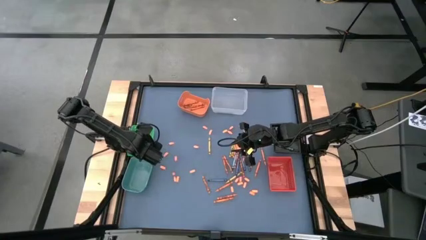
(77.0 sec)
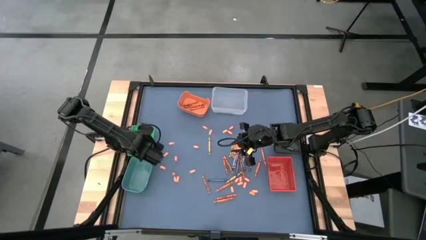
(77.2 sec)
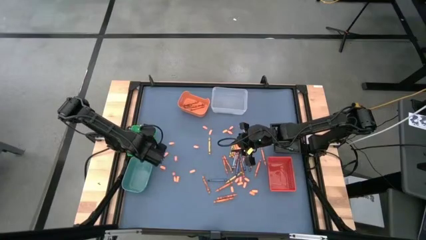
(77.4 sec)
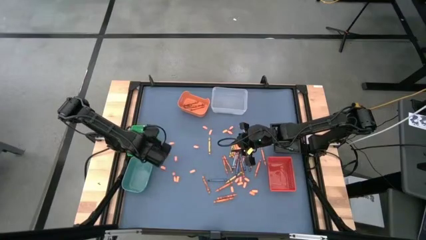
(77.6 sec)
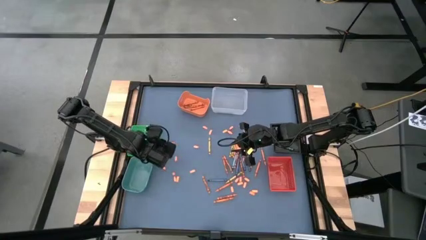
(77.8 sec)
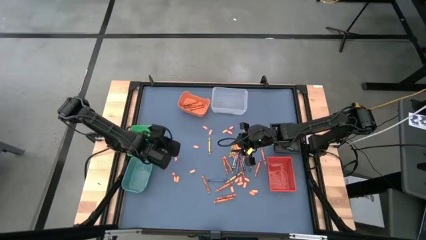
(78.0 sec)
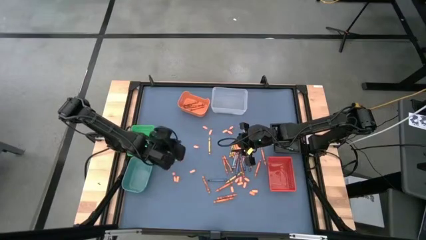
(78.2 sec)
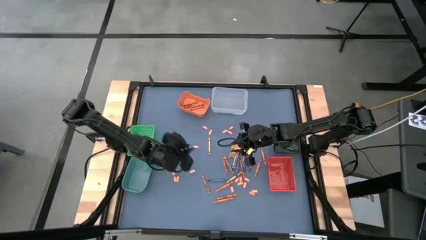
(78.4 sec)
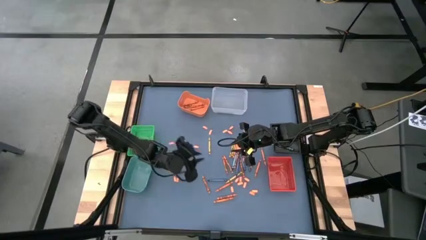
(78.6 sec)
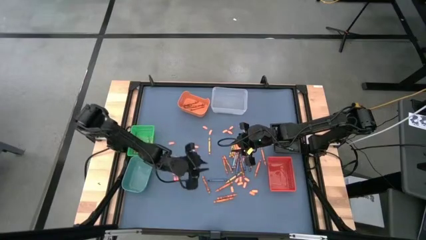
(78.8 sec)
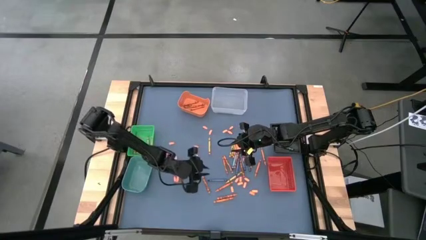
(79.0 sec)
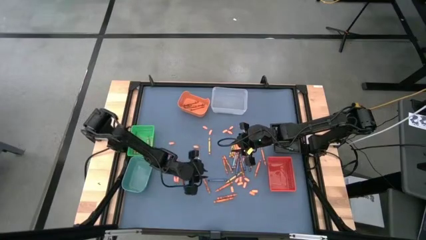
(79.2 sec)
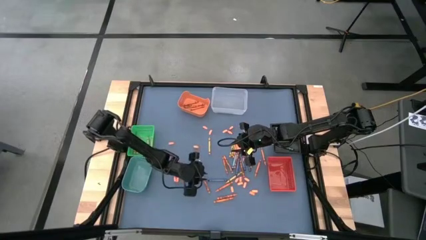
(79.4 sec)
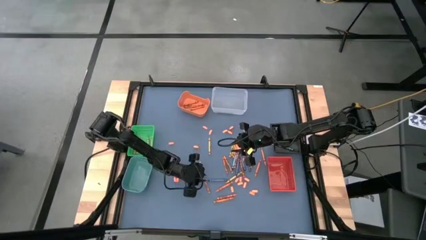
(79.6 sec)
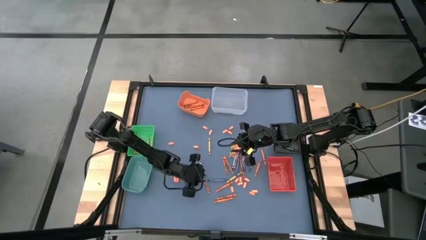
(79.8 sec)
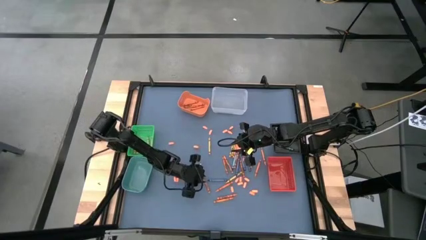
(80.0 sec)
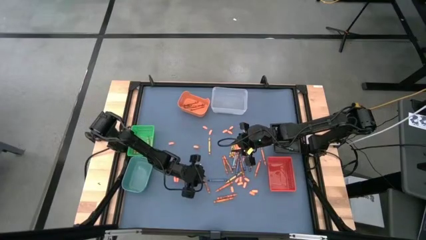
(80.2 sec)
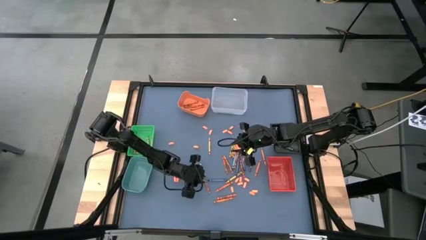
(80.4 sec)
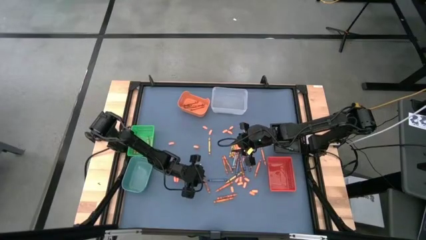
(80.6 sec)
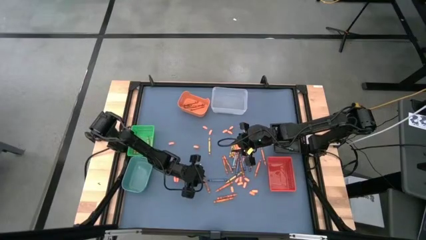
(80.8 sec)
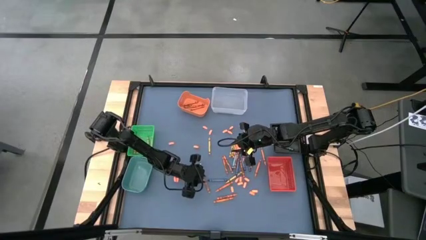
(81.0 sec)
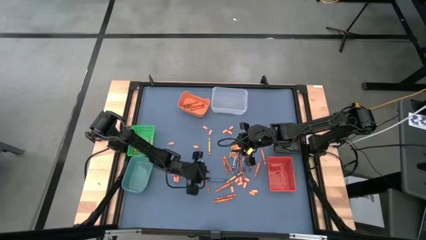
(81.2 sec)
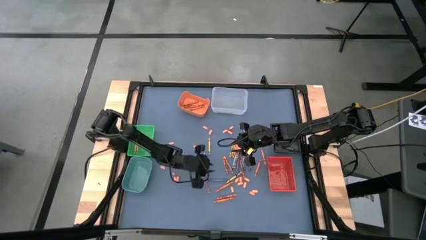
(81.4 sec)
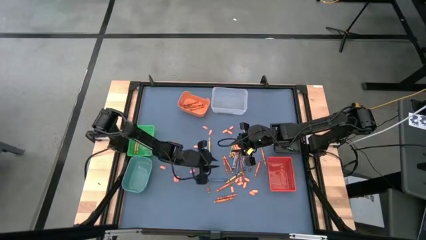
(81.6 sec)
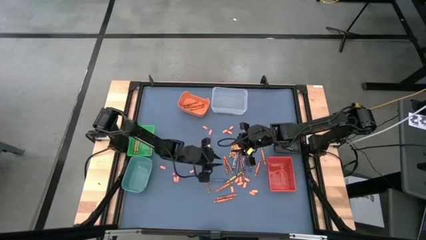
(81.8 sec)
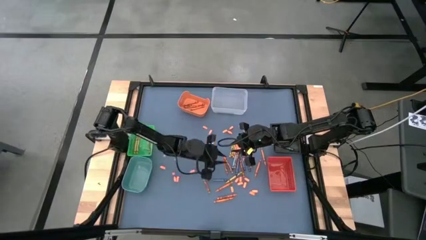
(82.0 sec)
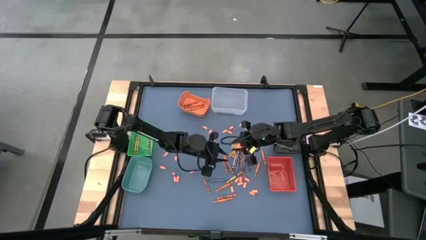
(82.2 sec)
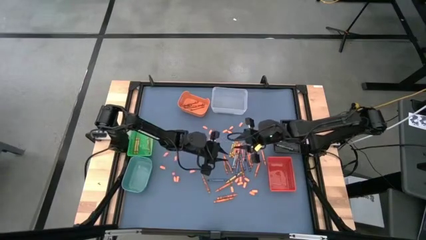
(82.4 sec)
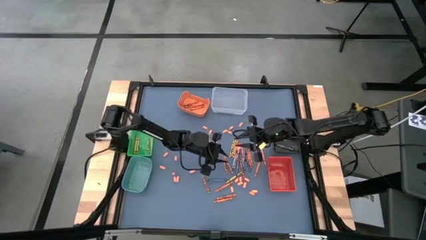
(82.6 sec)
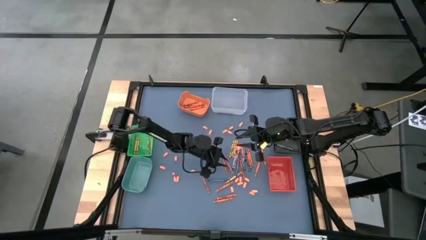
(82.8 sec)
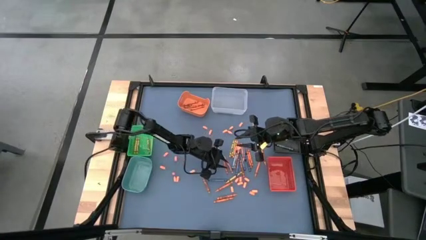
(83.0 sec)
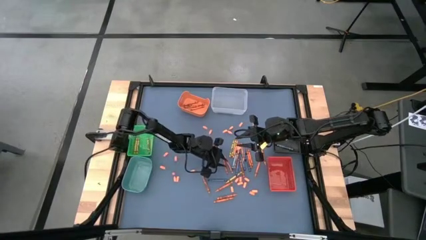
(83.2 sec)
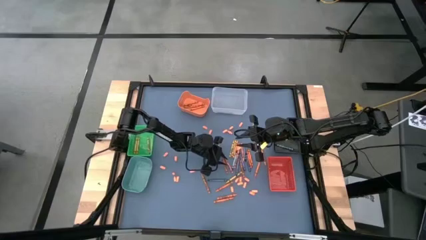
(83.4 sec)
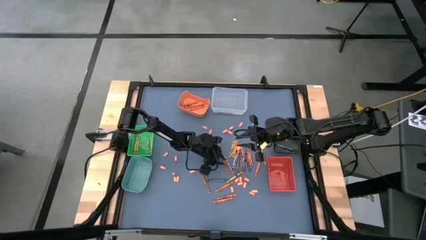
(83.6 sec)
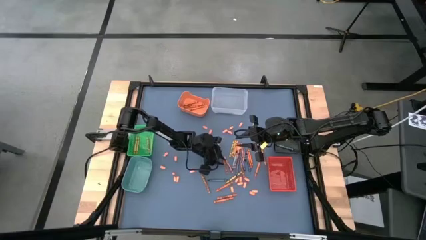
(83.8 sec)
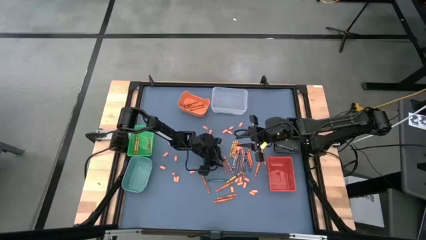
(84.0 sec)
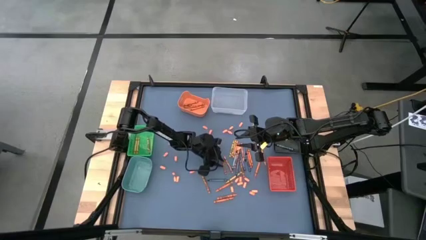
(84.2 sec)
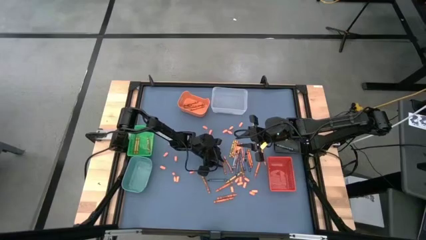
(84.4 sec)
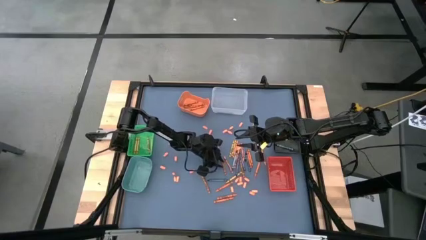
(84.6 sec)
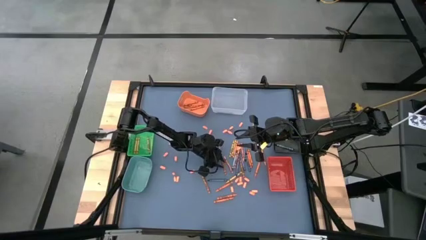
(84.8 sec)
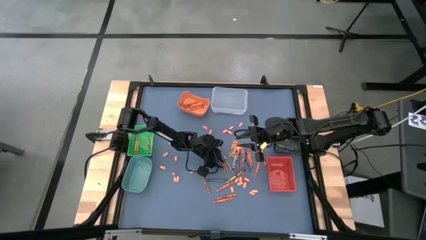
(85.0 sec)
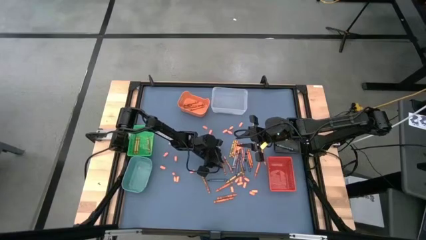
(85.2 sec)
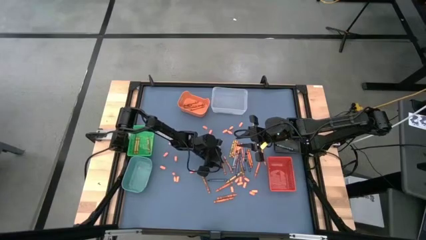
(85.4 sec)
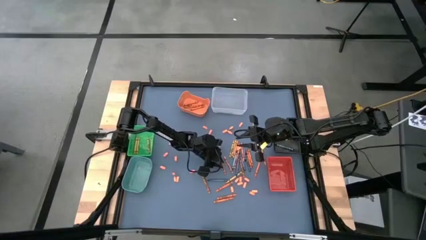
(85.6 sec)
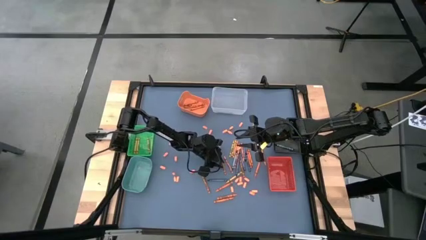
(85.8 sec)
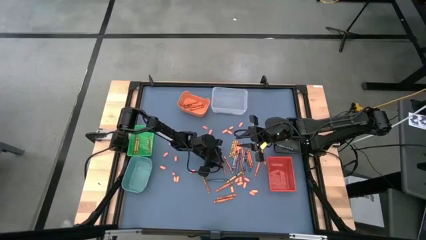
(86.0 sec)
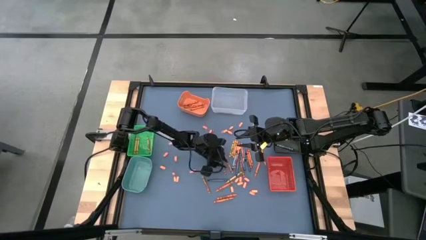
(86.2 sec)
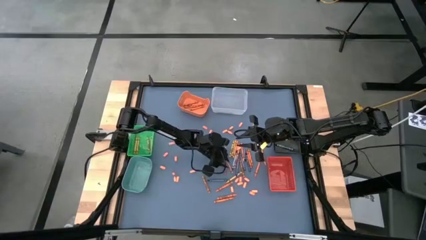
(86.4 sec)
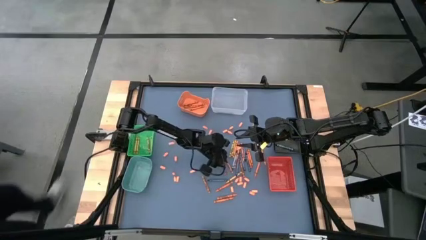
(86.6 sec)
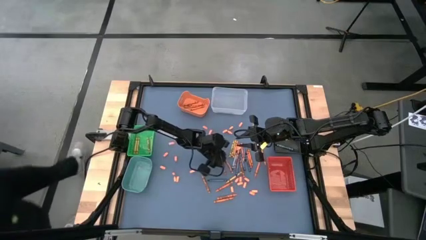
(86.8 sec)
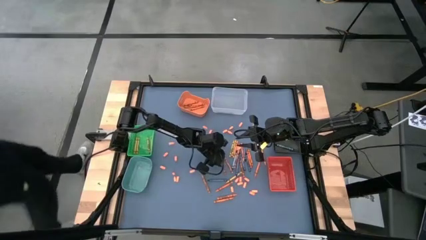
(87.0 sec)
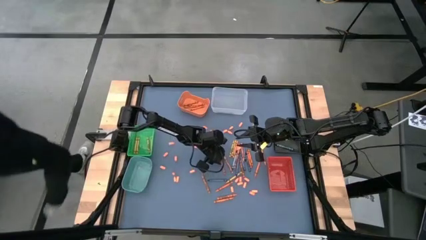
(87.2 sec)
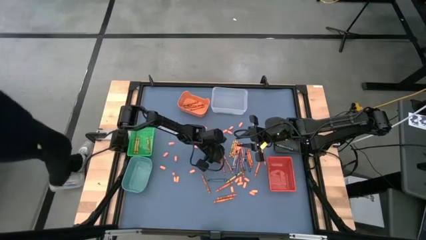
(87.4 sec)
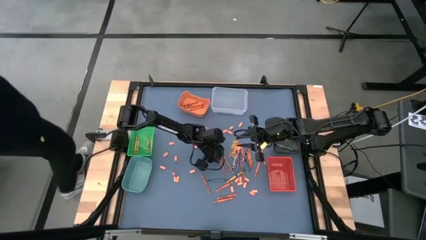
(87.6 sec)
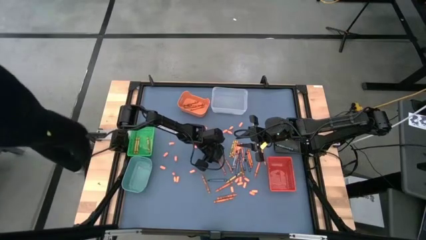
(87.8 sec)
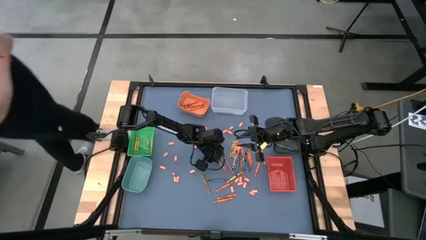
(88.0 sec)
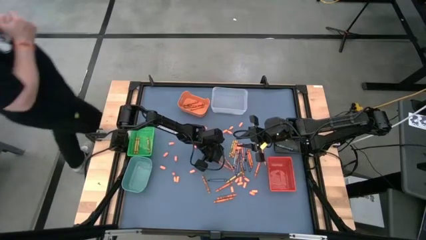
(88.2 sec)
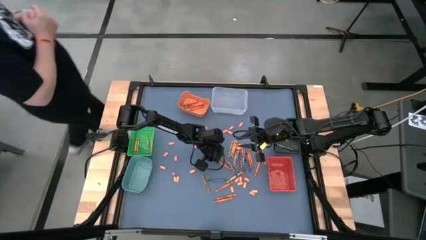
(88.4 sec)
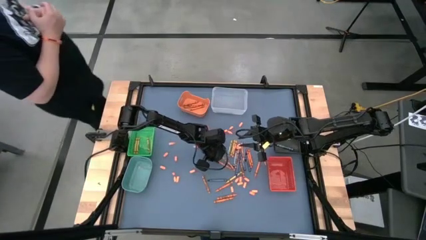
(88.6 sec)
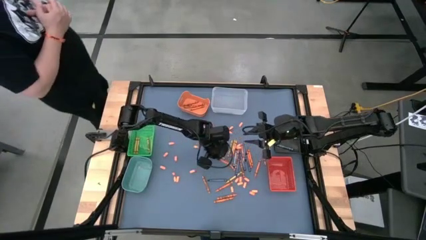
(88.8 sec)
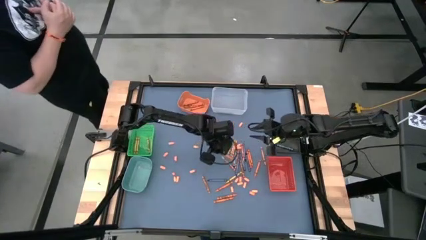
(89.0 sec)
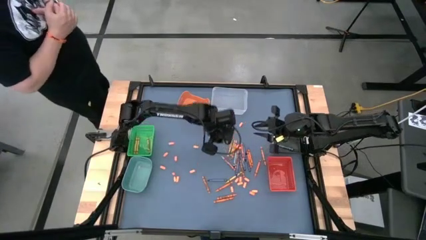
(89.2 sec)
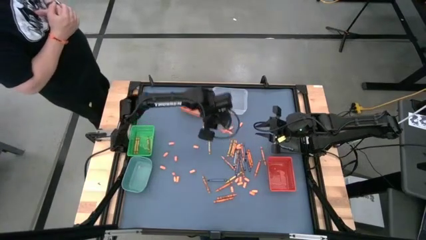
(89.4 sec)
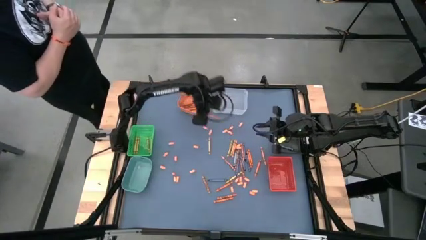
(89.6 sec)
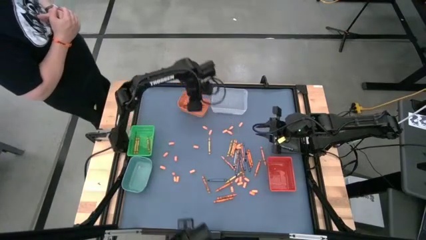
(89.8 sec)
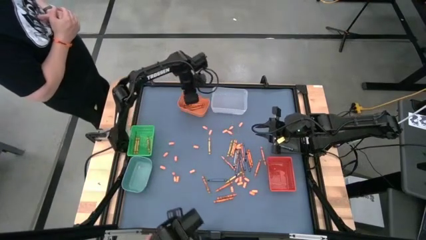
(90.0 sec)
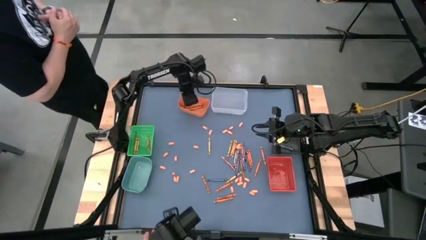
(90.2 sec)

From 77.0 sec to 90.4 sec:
Task: Sort crayons
Put the red crayon into the orange bin
